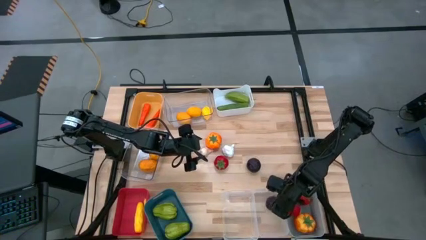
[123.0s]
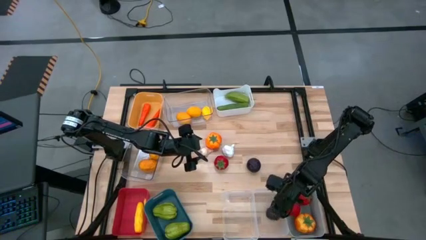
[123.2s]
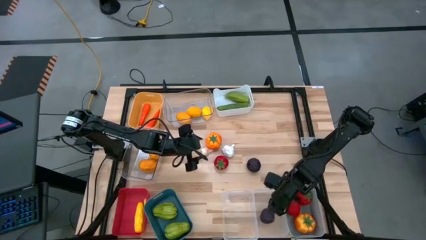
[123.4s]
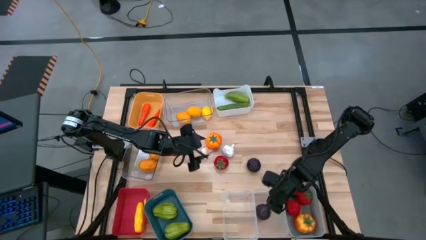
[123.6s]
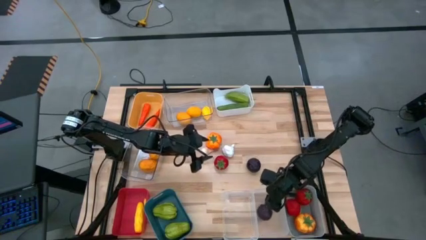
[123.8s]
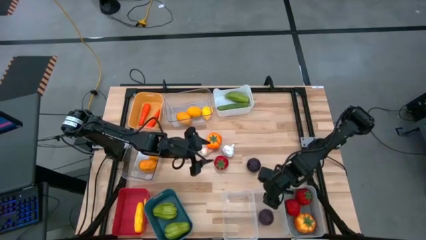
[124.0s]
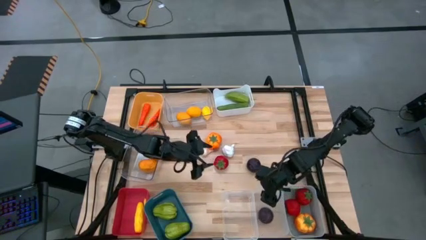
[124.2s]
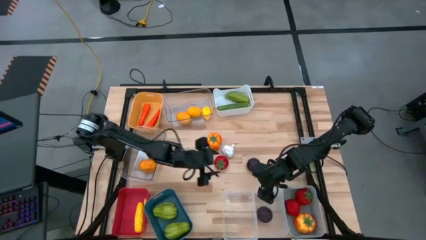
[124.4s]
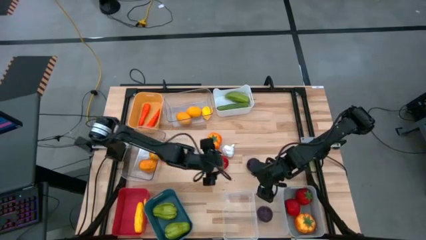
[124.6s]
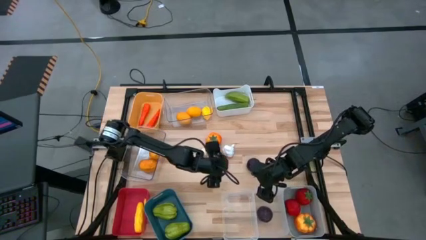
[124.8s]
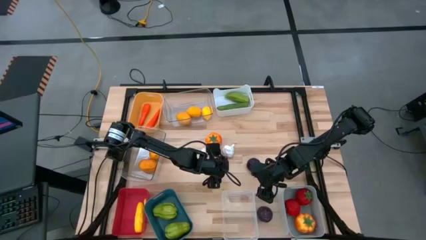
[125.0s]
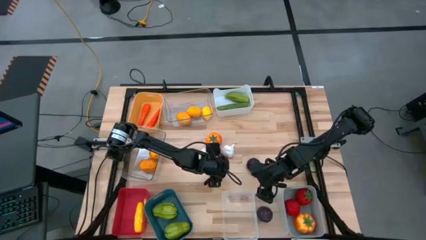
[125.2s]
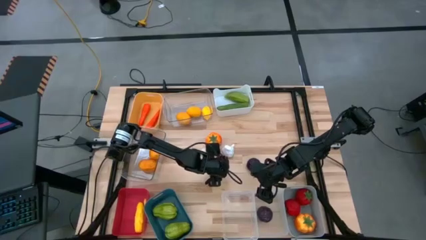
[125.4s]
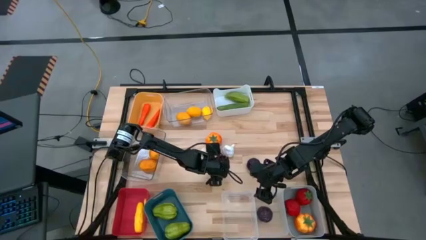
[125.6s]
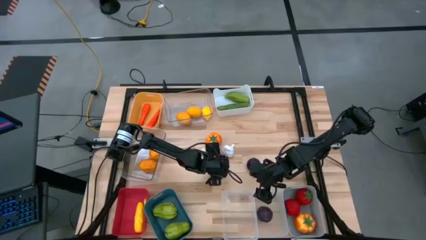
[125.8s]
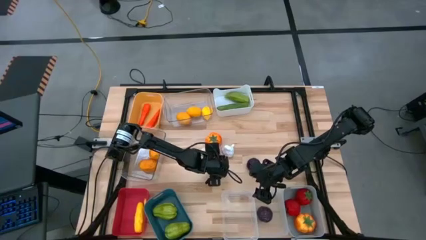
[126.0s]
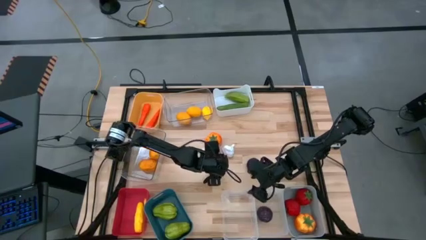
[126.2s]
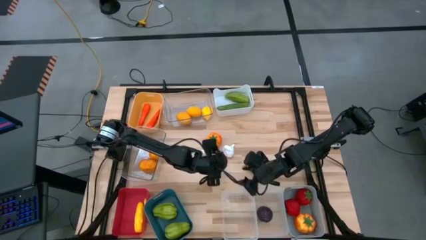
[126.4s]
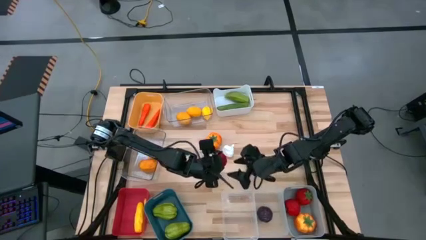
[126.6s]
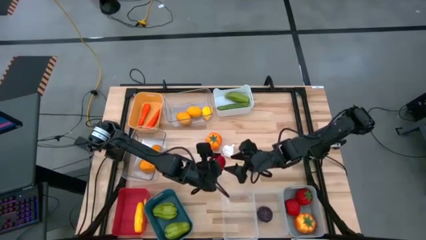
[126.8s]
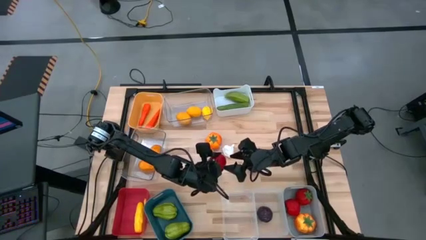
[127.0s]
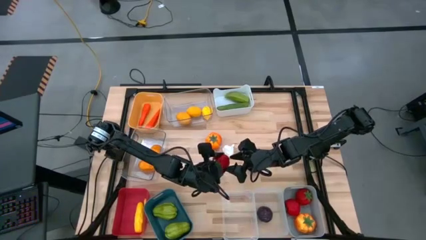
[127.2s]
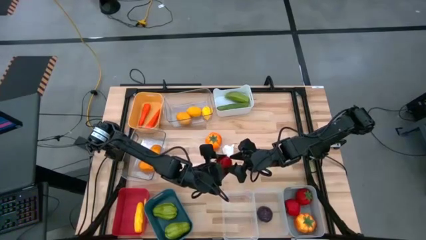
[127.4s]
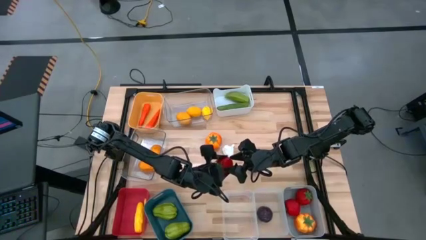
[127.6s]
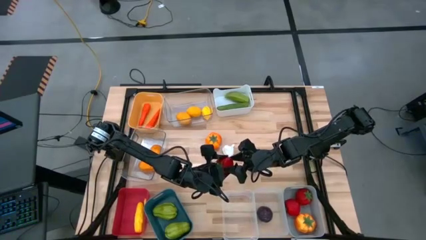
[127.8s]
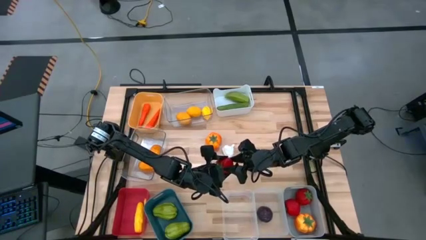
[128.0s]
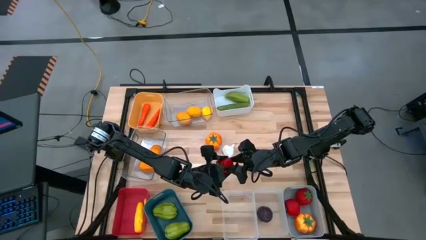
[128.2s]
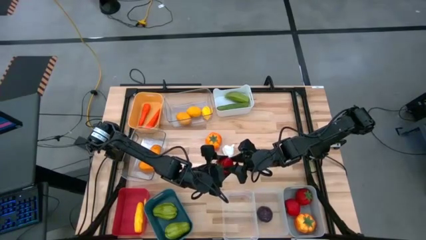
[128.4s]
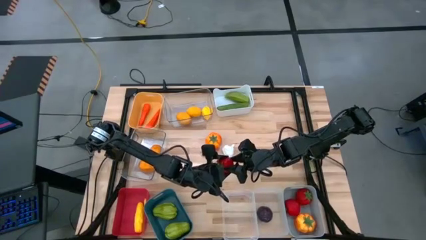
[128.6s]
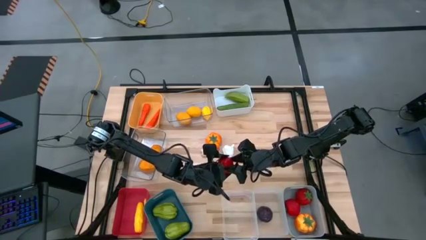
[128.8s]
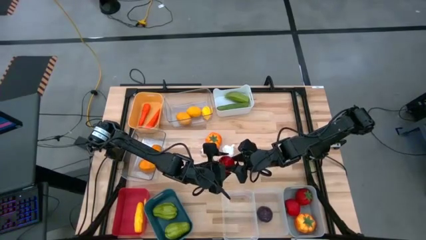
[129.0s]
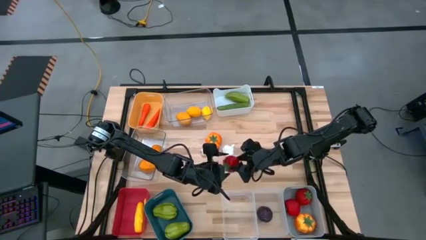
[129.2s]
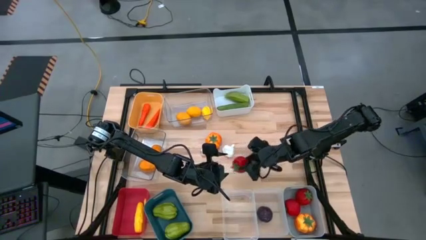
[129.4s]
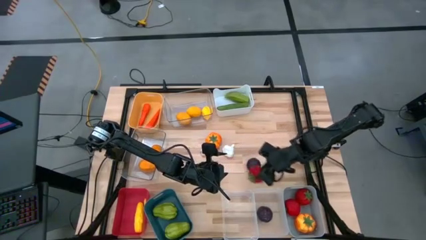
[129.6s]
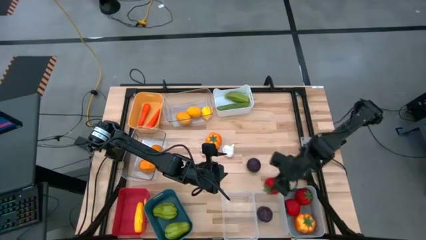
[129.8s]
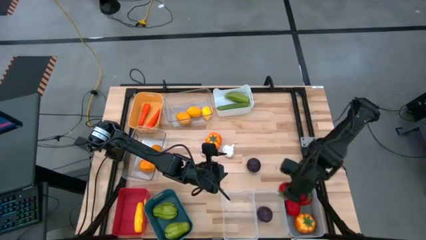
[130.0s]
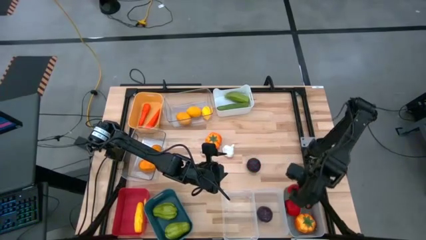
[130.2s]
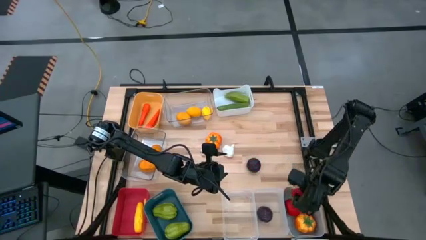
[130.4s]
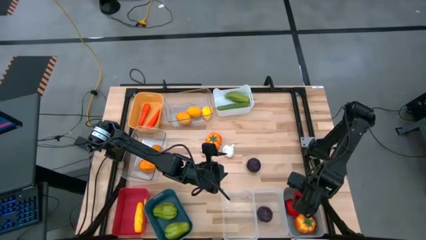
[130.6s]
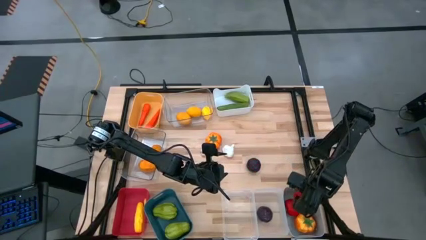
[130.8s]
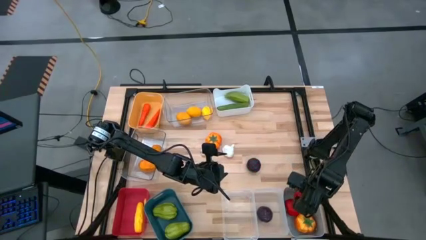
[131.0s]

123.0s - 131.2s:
Task: Sort produce into baskets
Put the red tomato into the gray bin

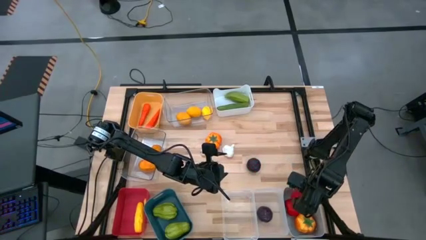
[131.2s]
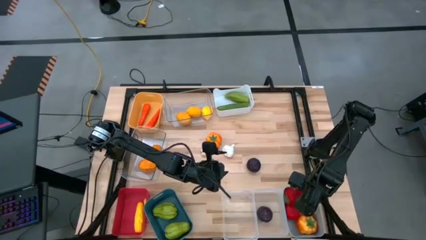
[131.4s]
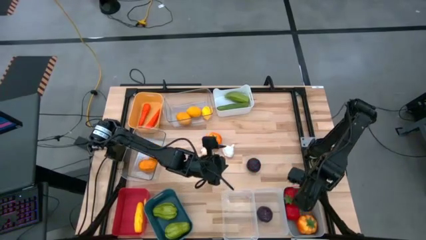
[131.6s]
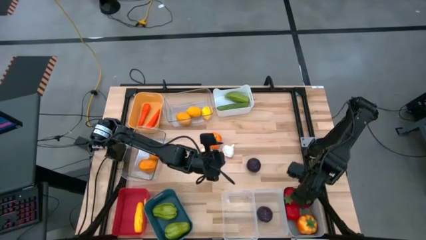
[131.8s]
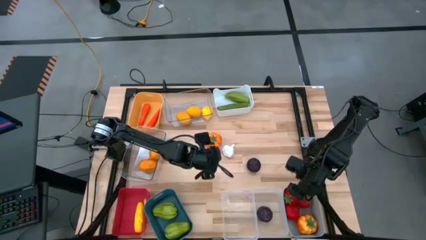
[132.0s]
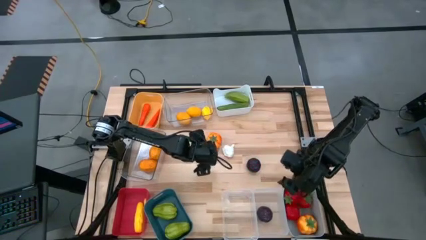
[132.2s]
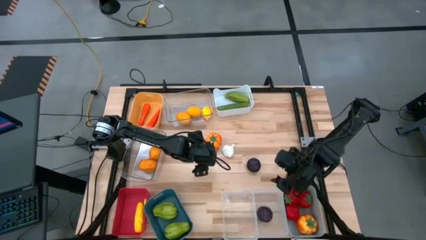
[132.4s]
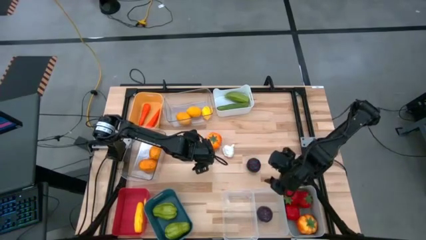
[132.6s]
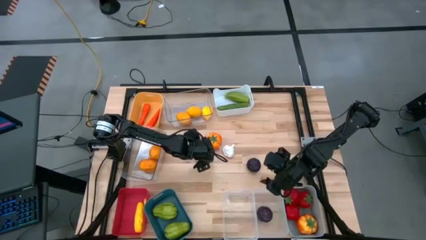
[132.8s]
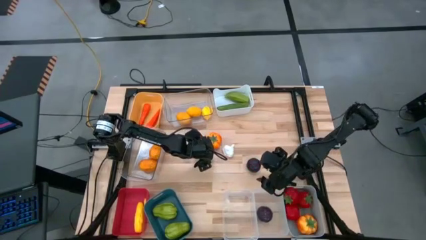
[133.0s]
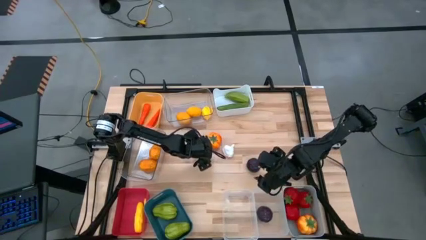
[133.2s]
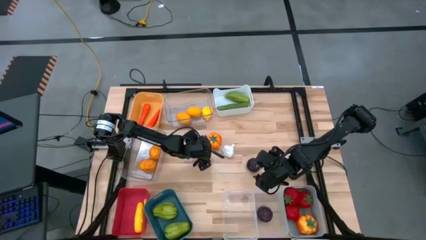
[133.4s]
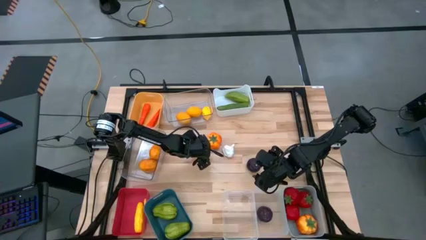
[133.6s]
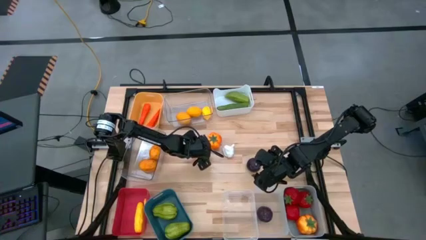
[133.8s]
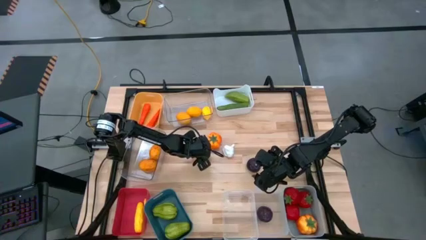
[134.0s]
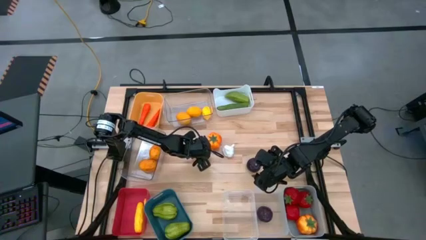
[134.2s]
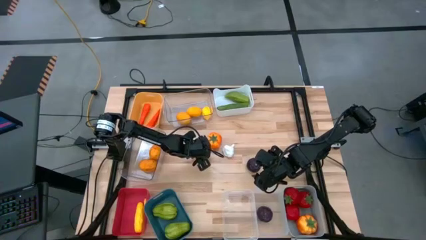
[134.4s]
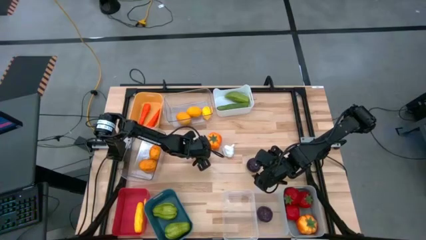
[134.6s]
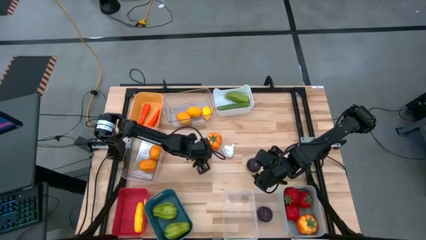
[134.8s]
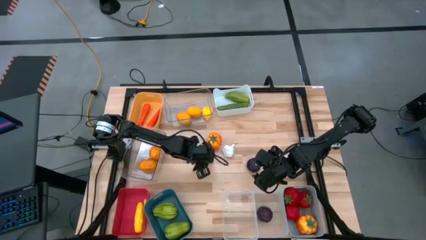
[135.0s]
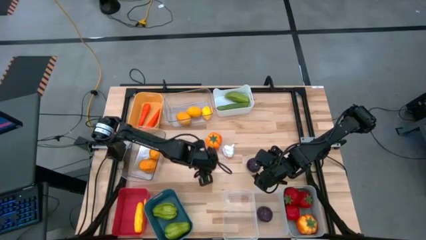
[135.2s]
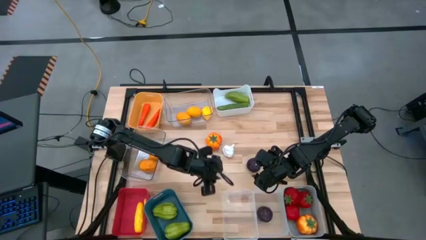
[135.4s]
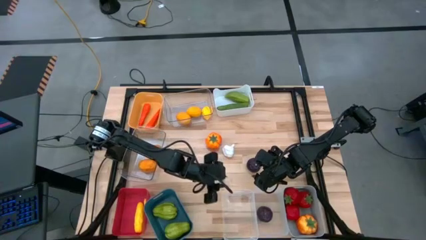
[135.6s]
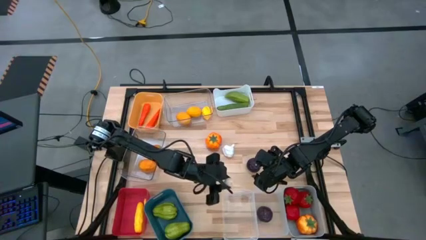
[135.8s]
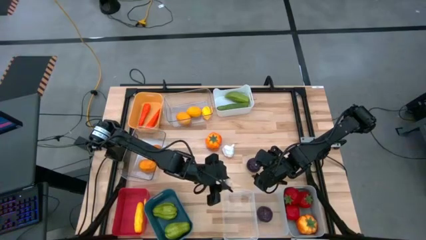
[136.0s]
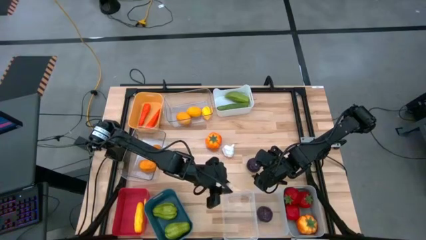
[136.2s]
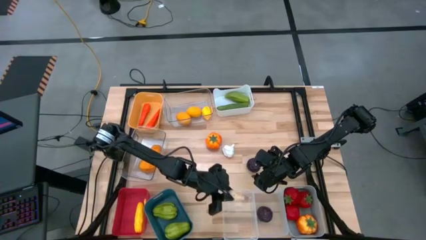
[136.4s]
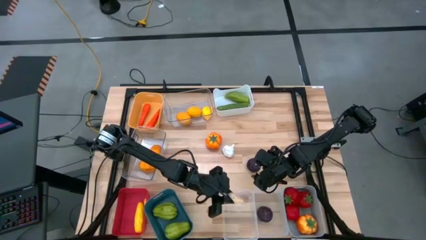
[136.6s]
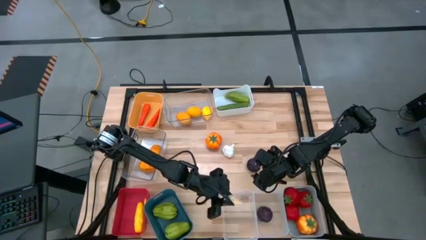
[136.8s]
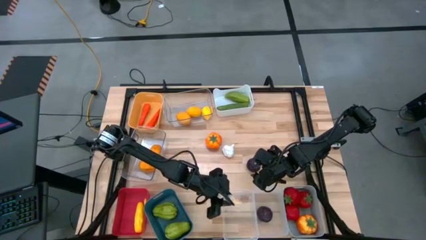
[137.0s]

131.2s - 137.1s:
Put the left white garlic into the bottom left transparent bin

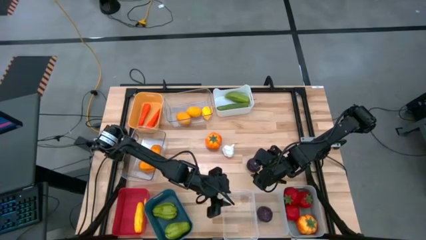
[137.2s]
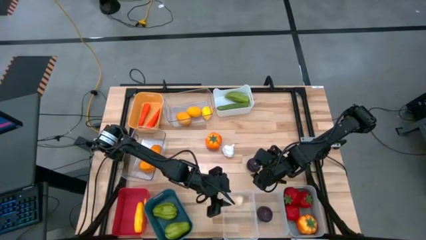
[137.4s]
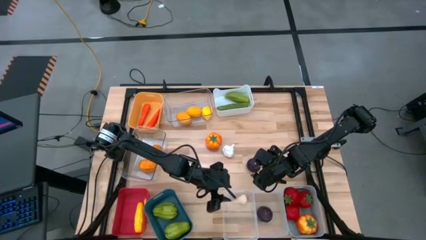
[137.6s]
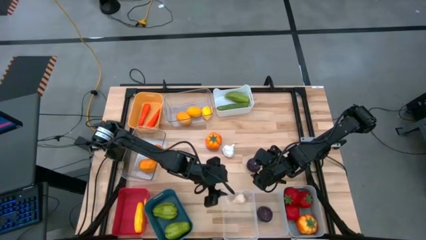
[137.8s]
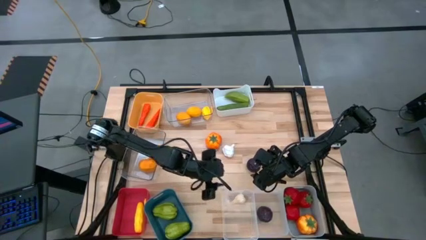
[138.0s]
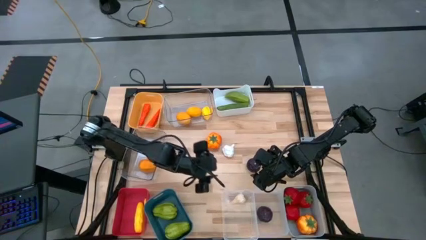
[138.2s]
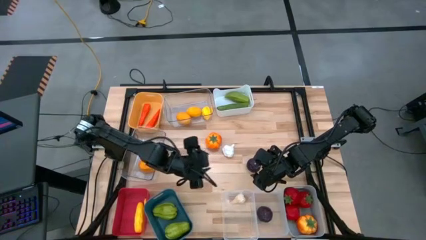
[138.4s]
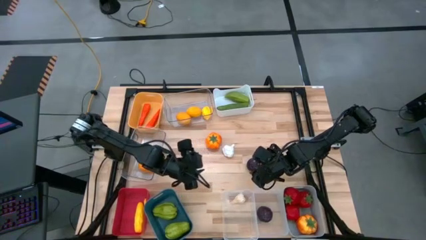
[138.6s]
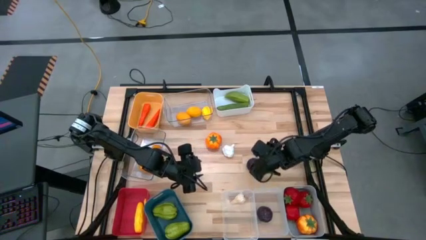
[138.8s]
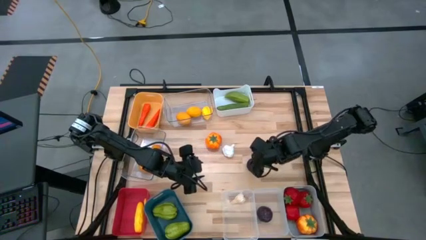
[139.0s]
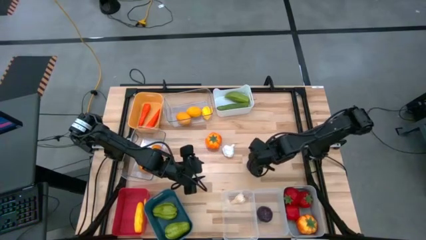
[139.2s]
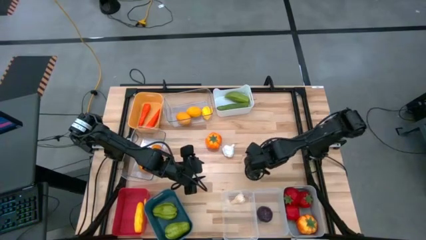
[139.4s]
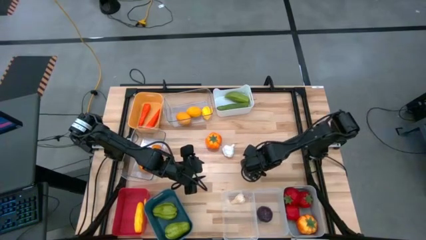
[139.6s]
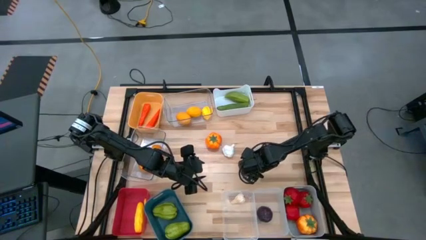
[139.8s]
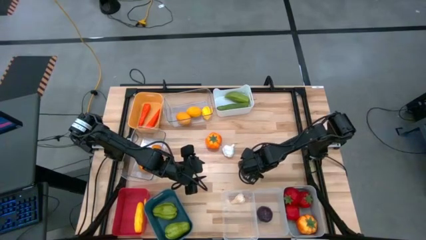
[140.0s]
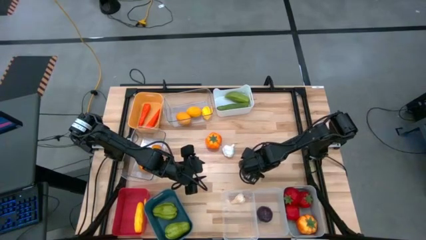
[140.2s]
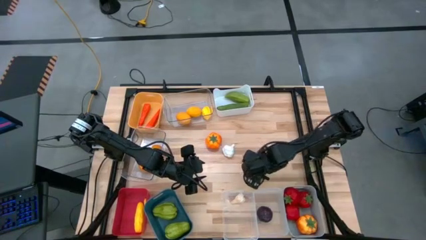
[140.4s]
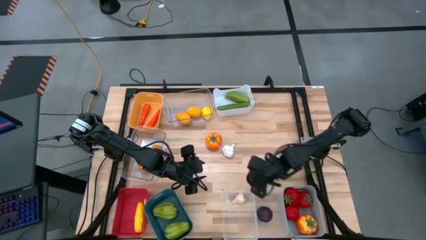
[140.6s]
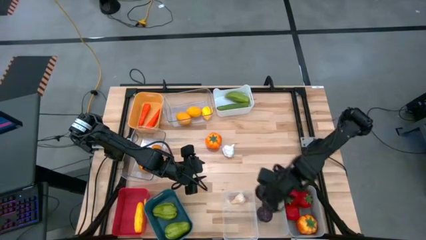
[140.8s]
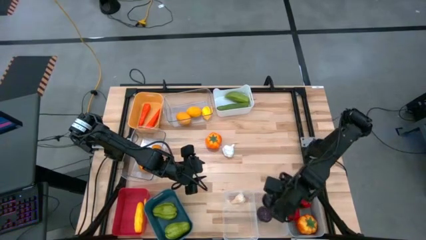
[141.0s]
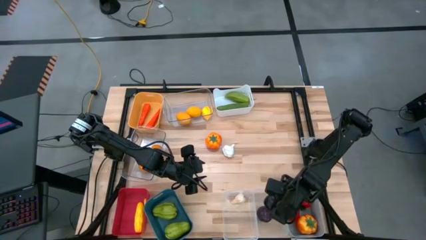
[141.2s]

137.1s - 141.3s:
Put the purple avocado into the bottom right transparent bin
